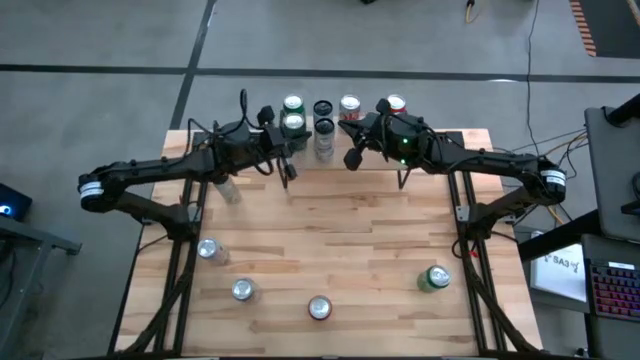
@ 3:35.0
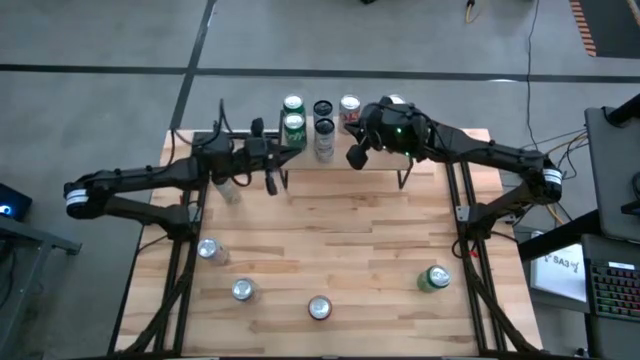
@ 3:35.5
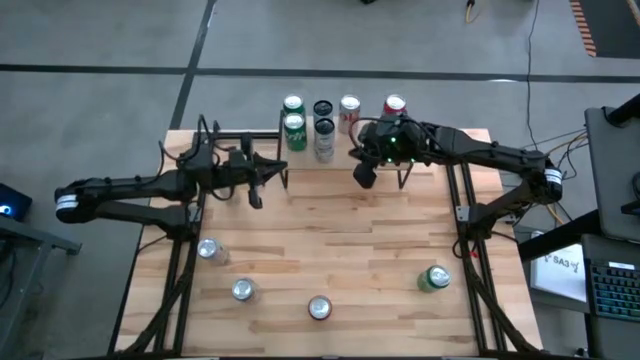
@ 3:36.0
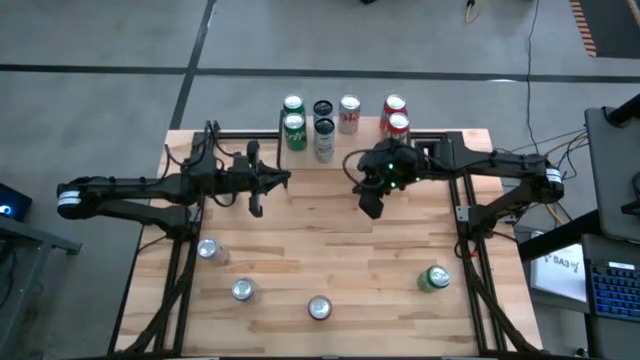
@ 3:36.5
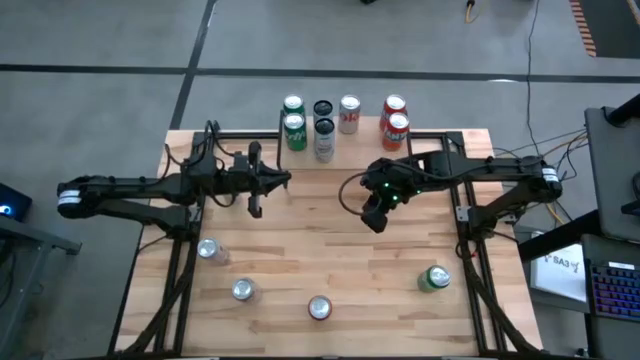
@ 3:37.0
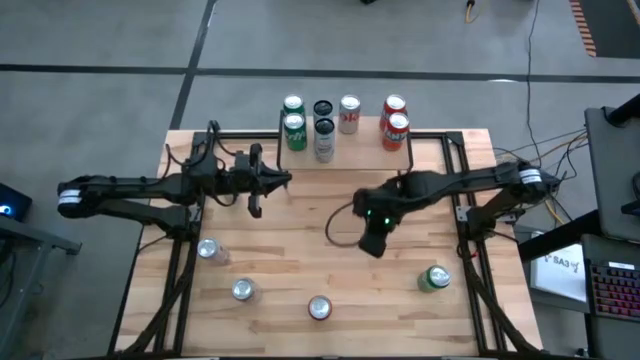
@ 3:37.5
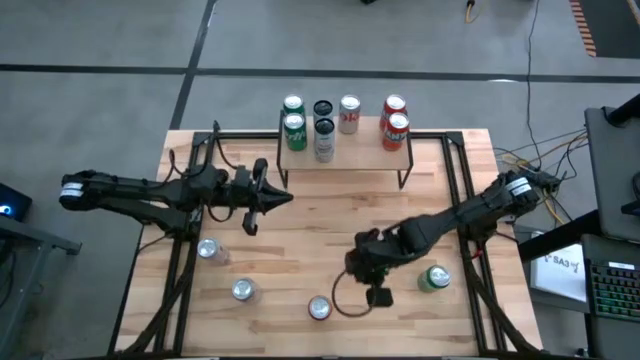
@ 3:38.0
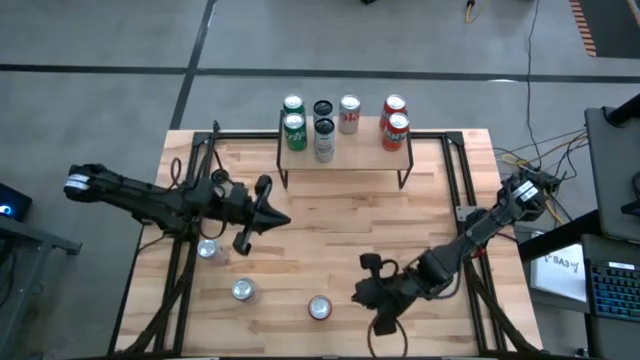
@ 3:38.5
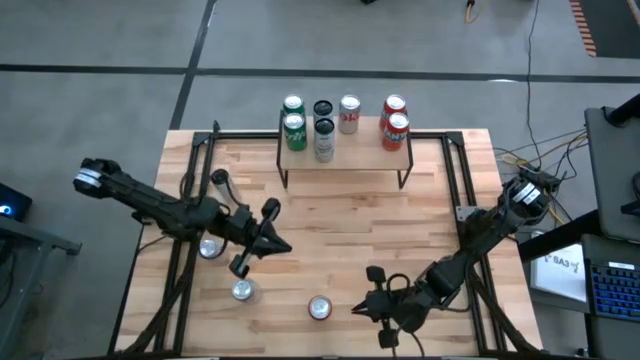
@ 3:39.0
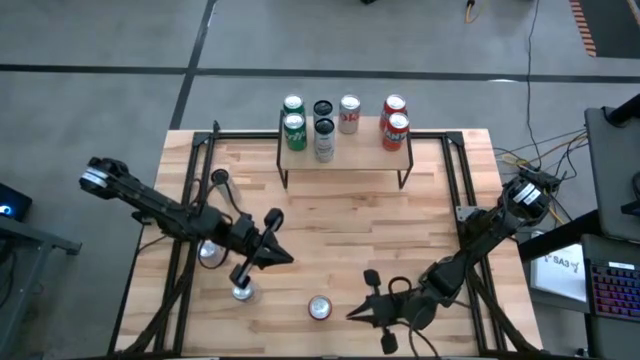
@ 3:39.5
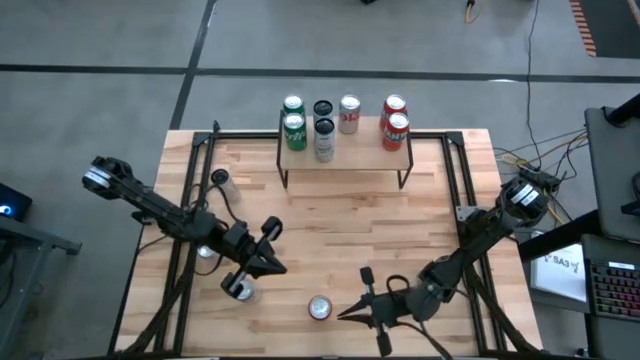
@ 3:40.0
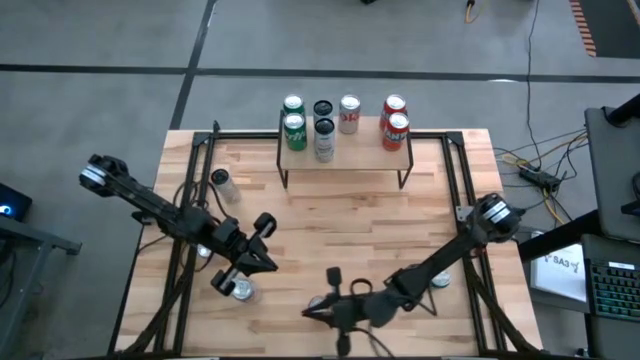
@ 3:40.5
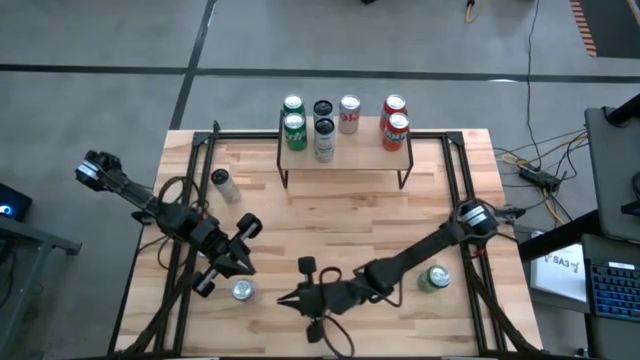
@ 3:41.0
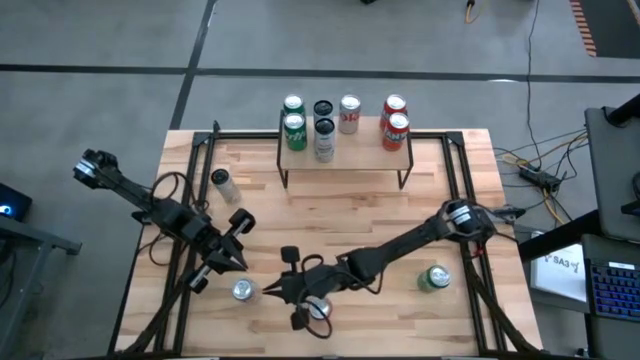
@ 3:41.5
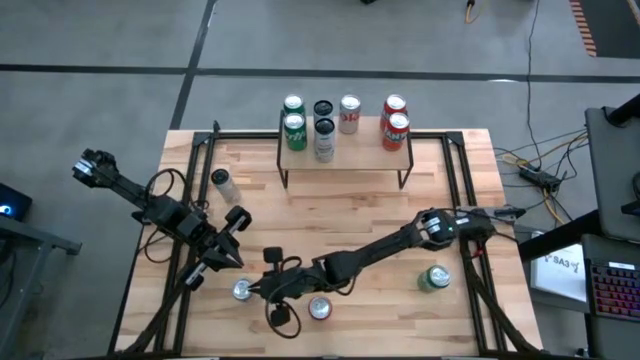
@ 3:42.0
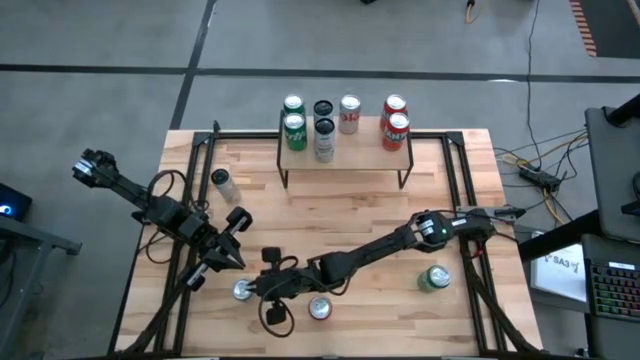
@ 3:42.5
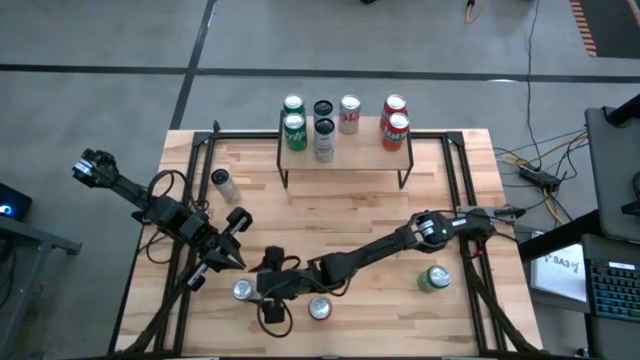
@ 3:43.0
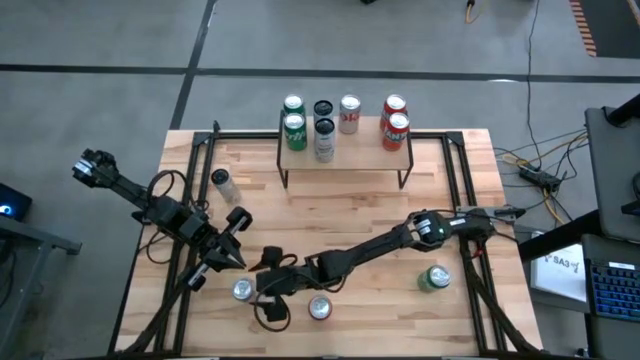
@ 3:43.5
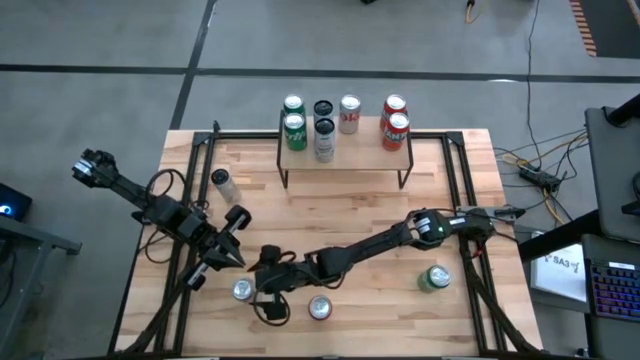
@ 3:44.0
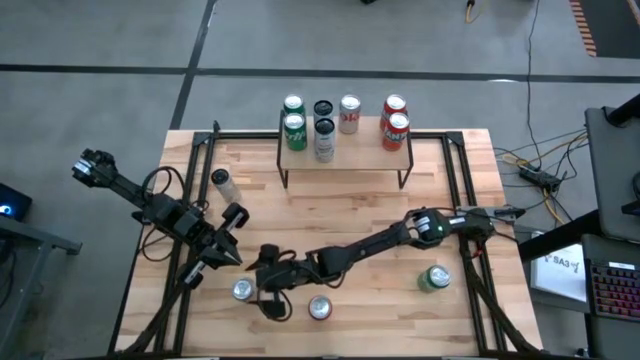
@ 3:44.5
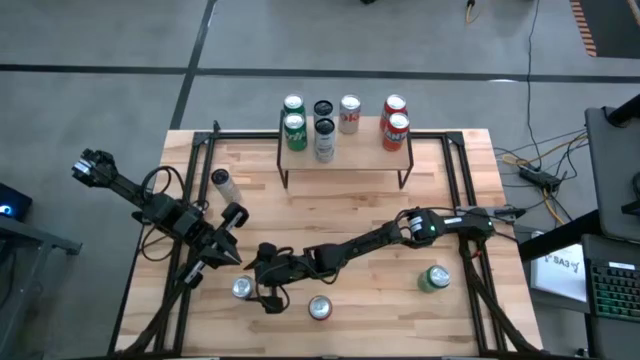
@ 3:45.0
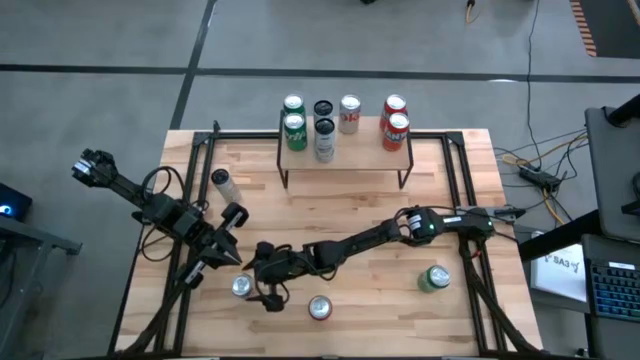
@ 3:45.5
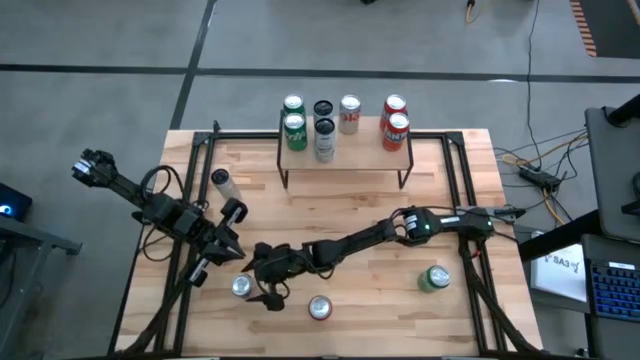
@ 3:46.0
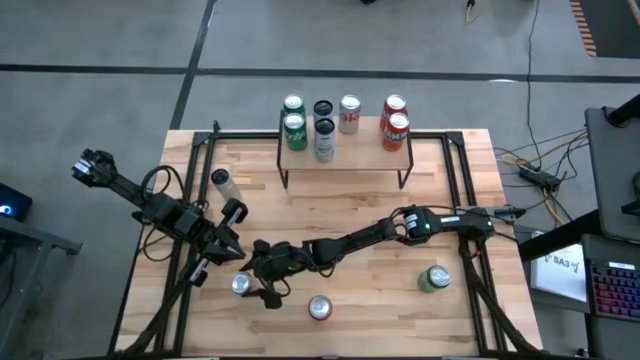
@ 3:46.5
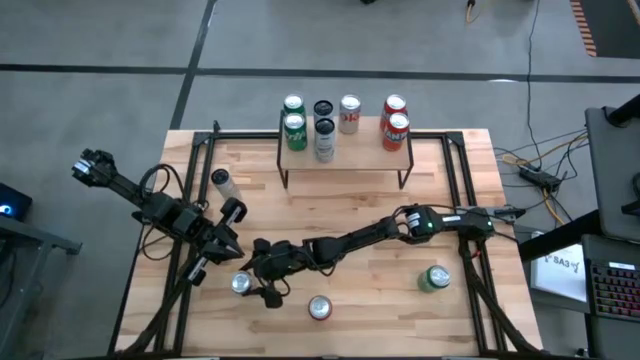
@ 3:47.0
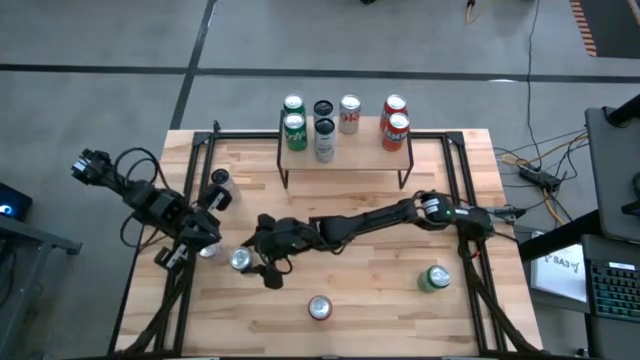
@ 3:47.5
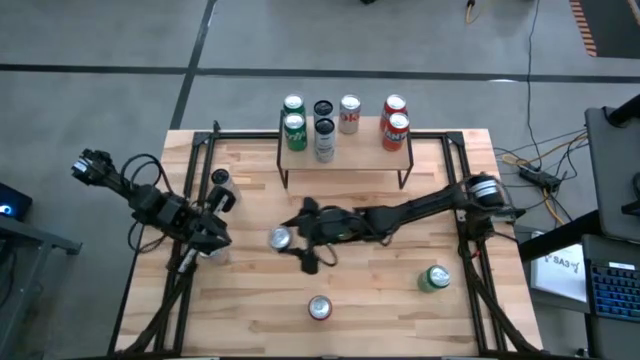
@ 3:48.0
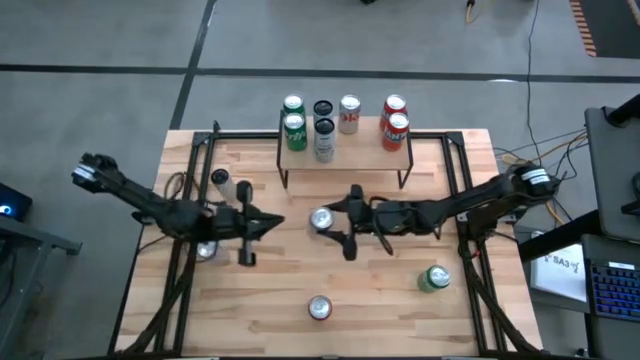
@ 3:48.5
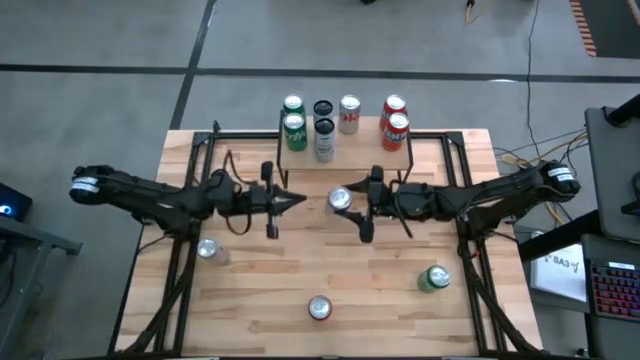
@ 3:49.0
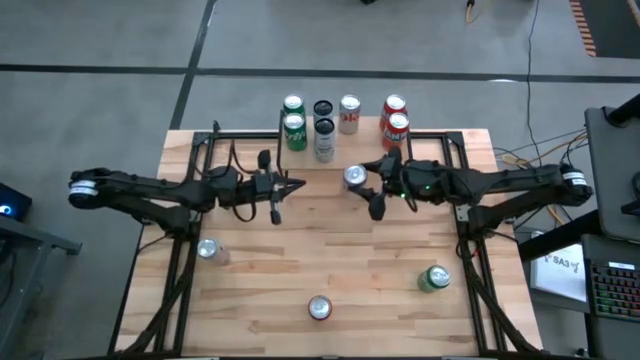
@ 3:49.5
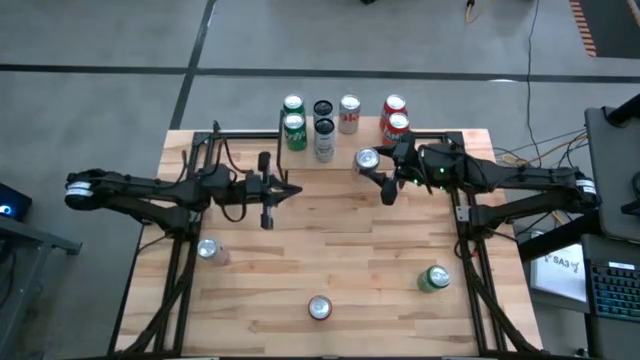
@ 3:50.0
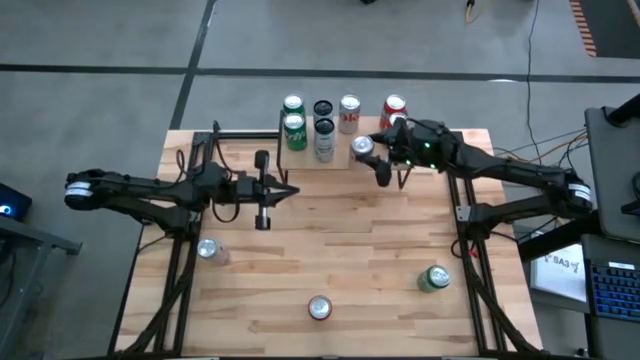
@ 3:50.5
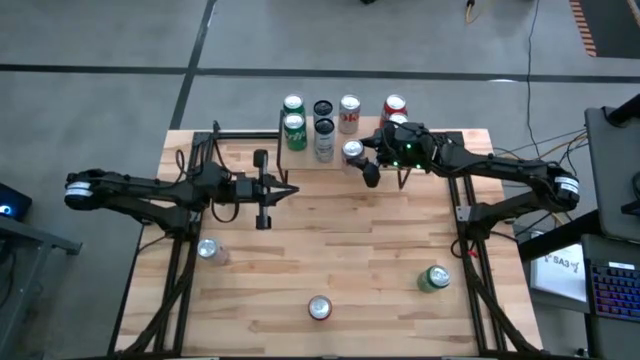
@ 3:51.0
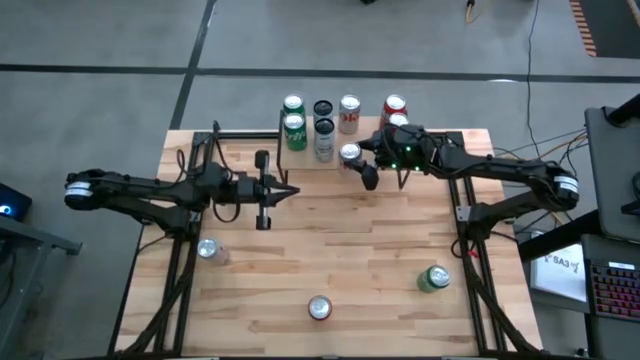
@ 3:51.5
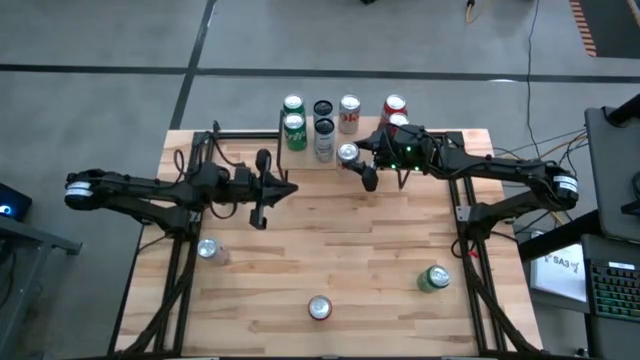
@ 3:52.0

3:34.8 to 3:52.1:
Task: Place canned beverage on shelf
Put the bottom white red soda can on the shelf aligned with the other white red soda can
